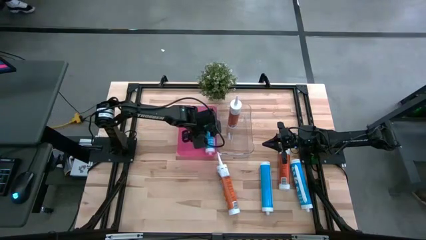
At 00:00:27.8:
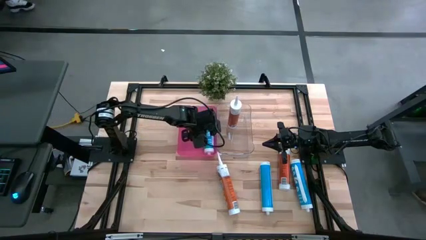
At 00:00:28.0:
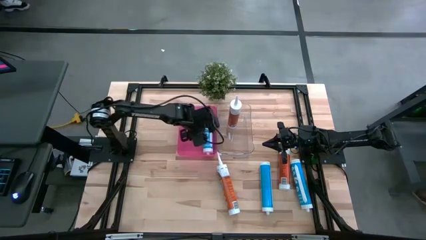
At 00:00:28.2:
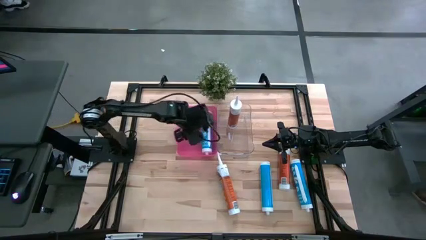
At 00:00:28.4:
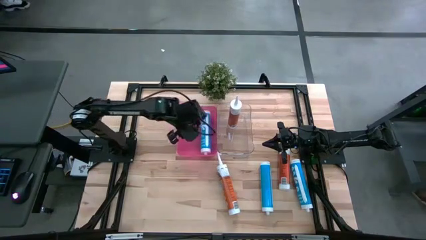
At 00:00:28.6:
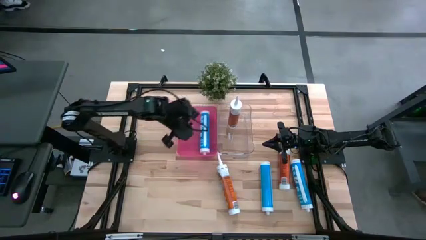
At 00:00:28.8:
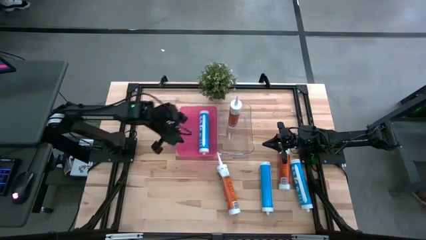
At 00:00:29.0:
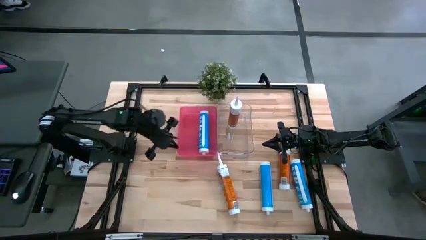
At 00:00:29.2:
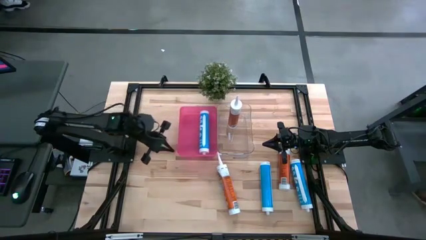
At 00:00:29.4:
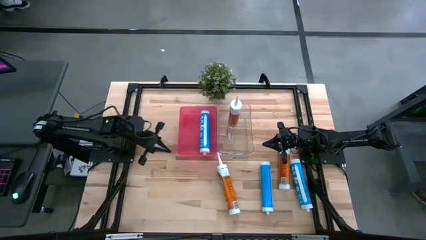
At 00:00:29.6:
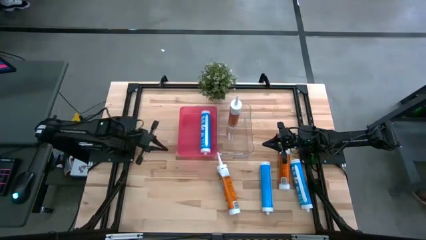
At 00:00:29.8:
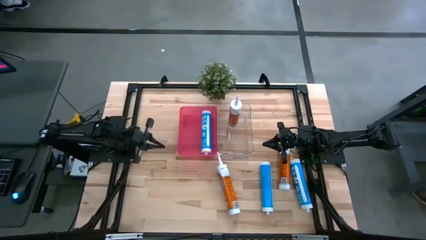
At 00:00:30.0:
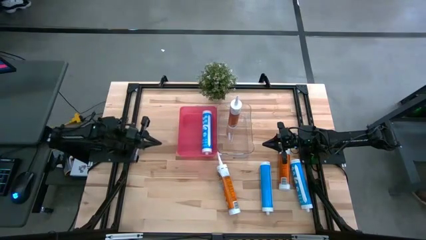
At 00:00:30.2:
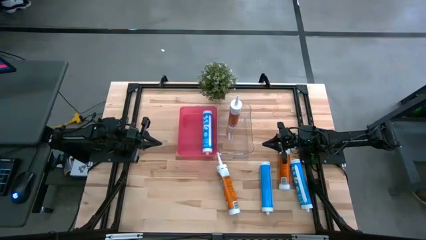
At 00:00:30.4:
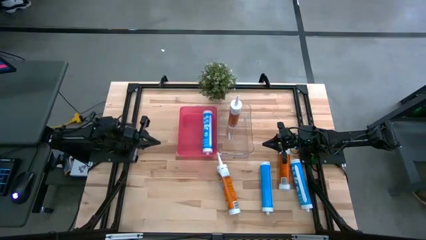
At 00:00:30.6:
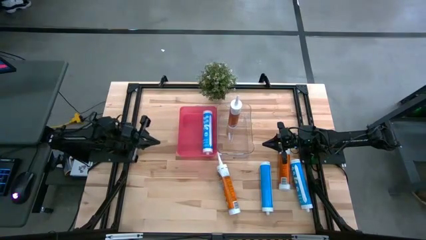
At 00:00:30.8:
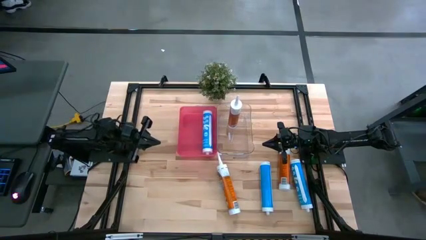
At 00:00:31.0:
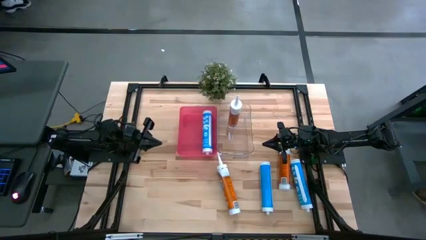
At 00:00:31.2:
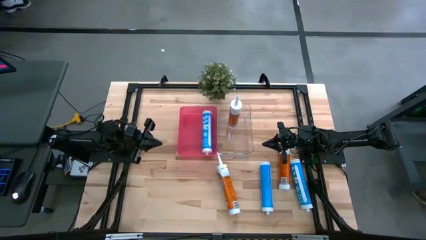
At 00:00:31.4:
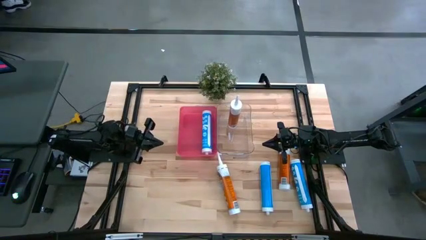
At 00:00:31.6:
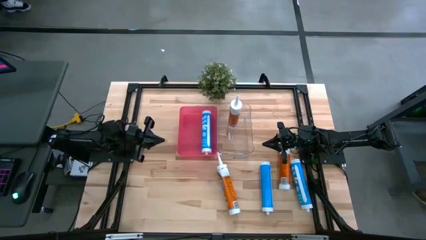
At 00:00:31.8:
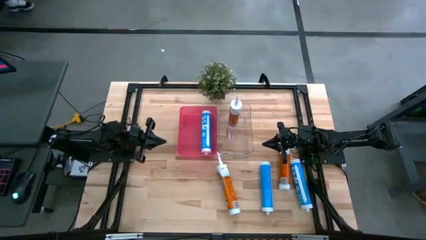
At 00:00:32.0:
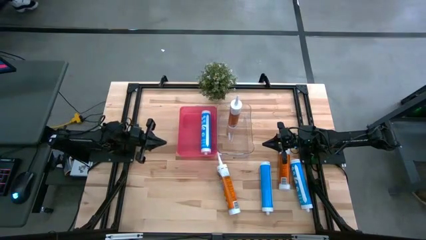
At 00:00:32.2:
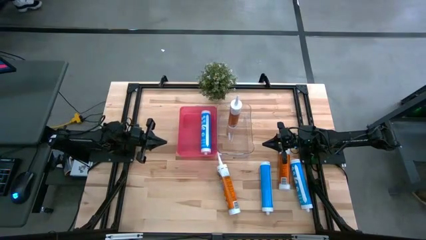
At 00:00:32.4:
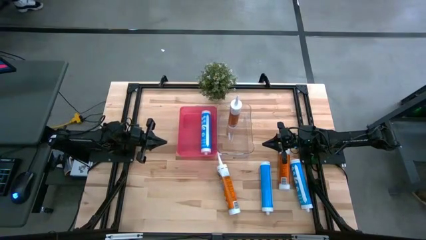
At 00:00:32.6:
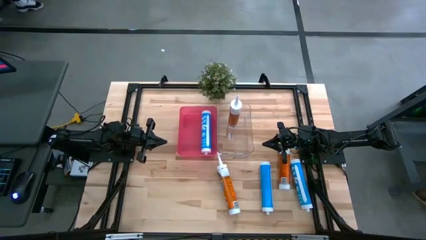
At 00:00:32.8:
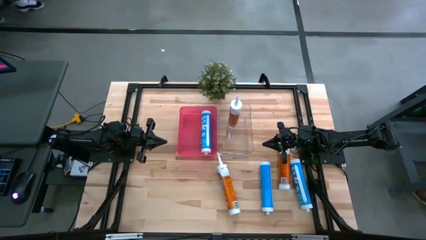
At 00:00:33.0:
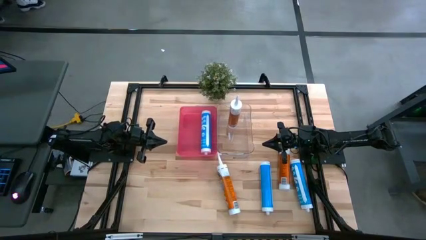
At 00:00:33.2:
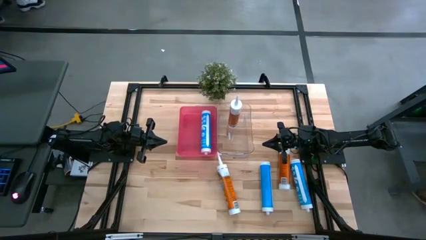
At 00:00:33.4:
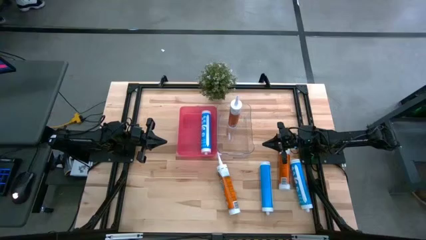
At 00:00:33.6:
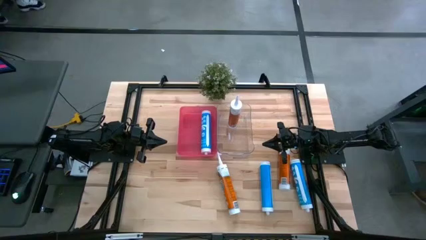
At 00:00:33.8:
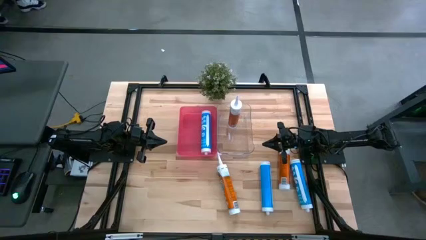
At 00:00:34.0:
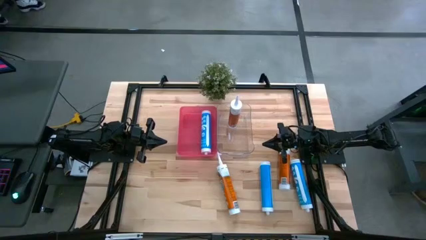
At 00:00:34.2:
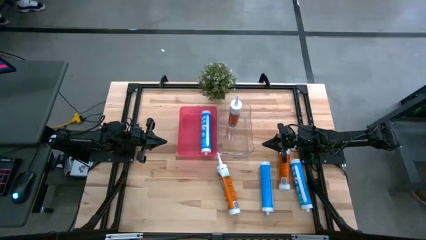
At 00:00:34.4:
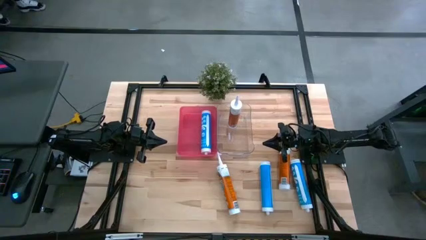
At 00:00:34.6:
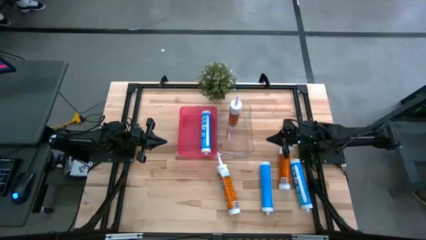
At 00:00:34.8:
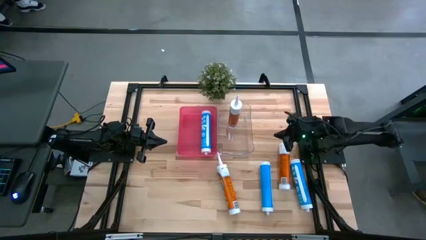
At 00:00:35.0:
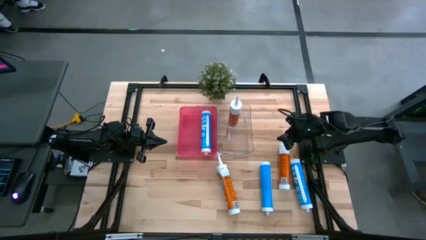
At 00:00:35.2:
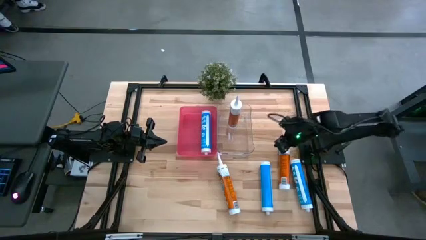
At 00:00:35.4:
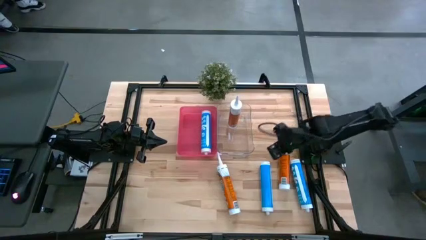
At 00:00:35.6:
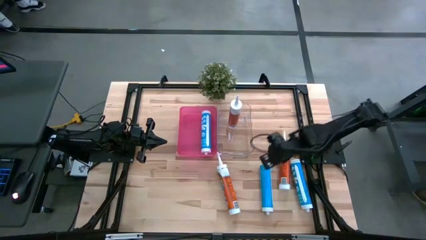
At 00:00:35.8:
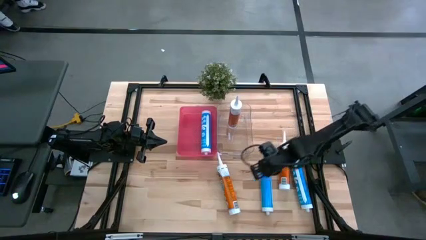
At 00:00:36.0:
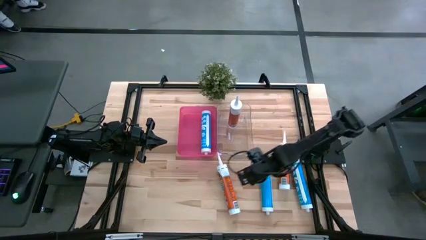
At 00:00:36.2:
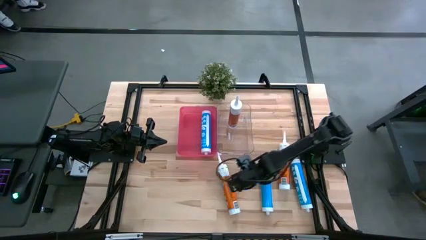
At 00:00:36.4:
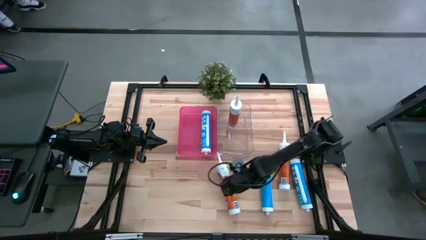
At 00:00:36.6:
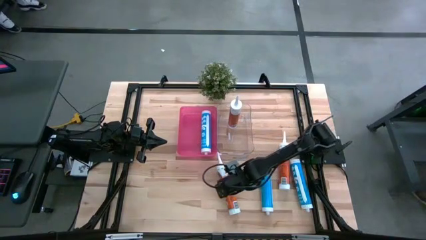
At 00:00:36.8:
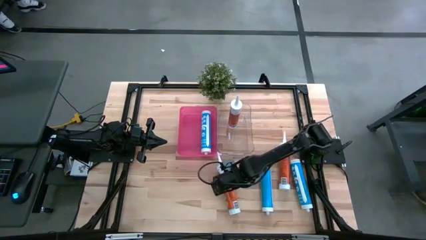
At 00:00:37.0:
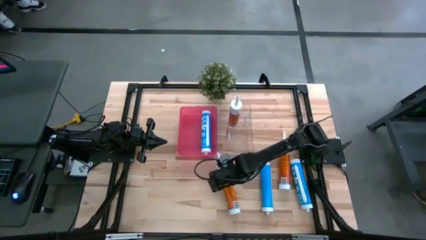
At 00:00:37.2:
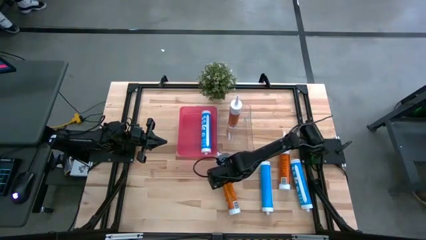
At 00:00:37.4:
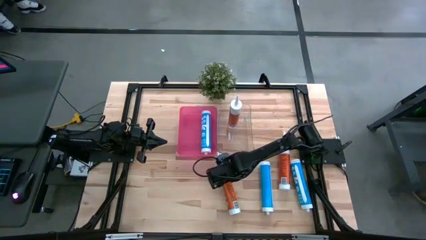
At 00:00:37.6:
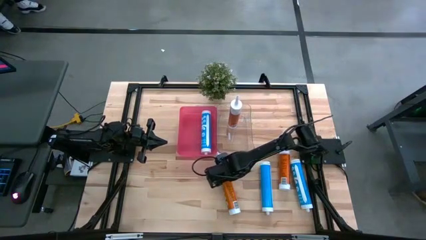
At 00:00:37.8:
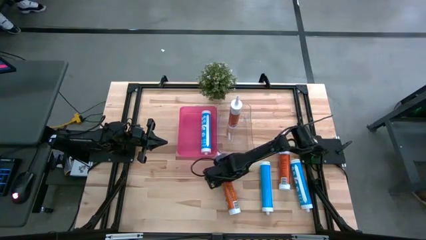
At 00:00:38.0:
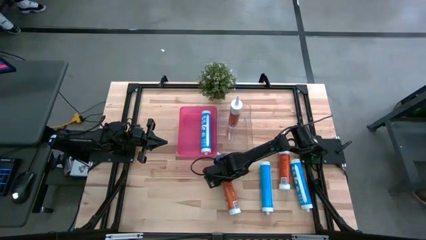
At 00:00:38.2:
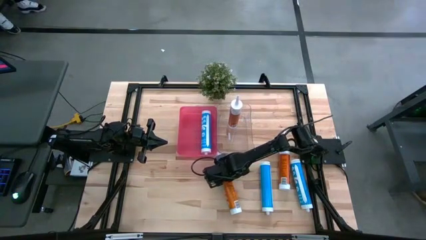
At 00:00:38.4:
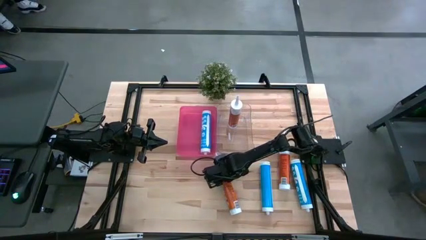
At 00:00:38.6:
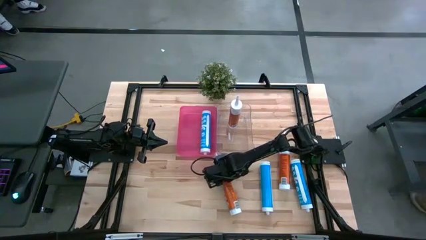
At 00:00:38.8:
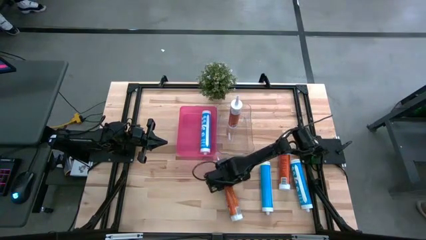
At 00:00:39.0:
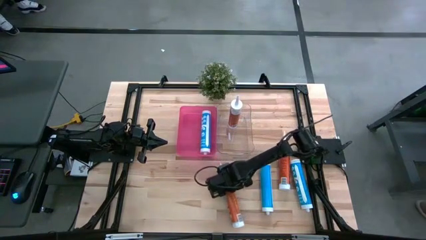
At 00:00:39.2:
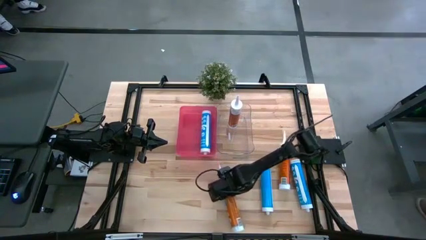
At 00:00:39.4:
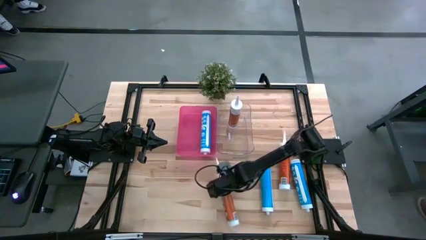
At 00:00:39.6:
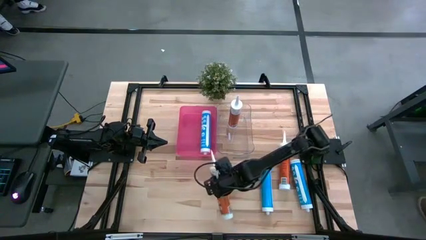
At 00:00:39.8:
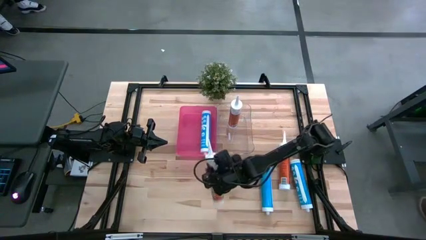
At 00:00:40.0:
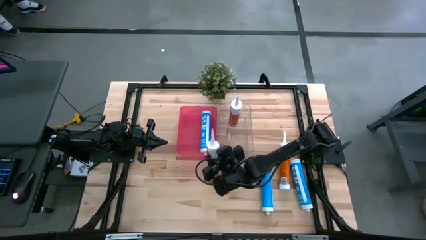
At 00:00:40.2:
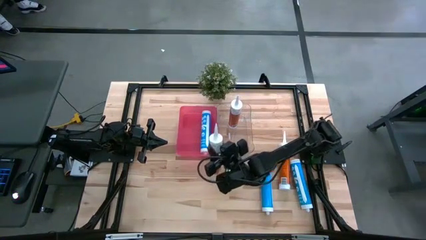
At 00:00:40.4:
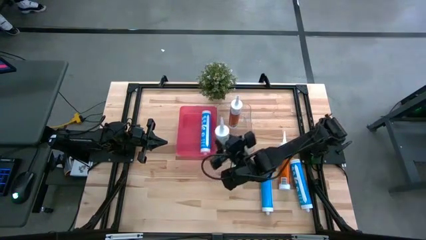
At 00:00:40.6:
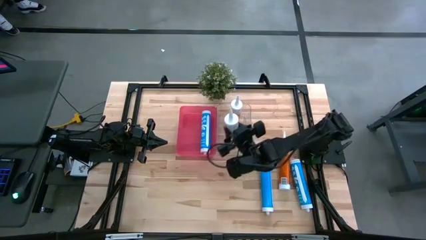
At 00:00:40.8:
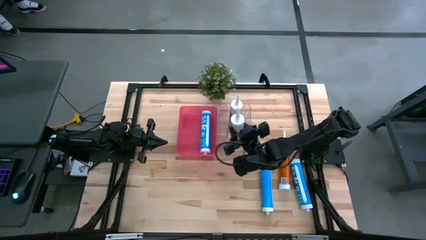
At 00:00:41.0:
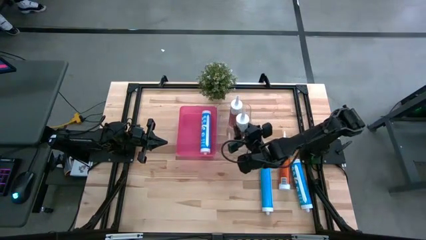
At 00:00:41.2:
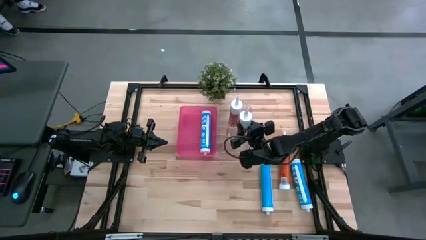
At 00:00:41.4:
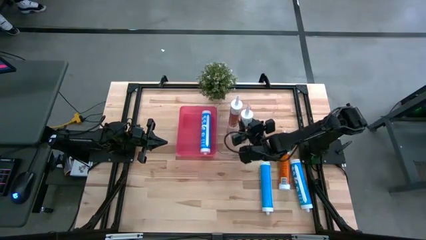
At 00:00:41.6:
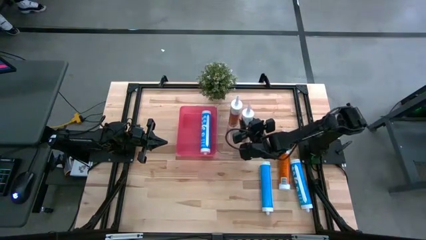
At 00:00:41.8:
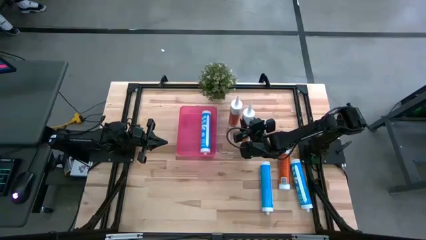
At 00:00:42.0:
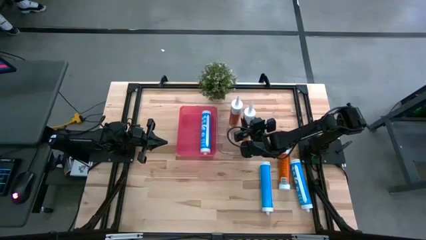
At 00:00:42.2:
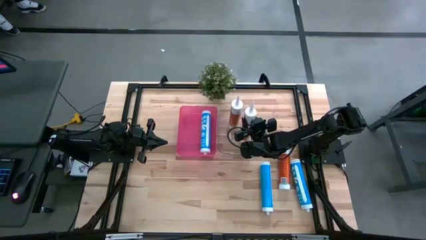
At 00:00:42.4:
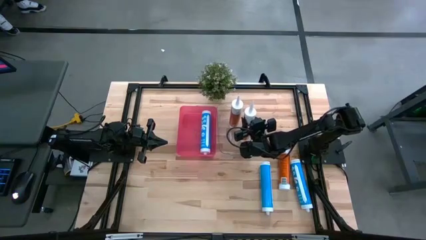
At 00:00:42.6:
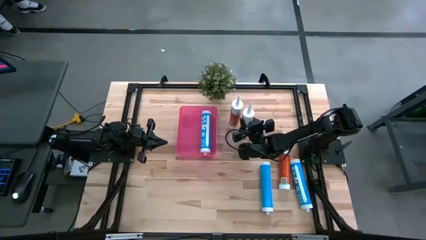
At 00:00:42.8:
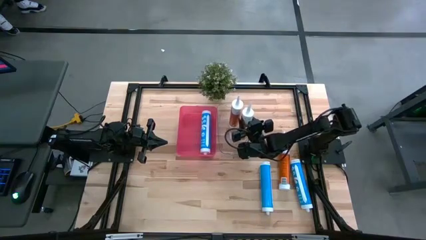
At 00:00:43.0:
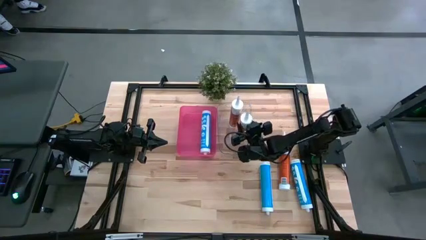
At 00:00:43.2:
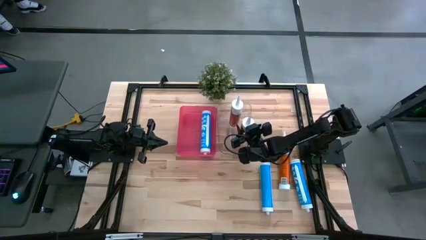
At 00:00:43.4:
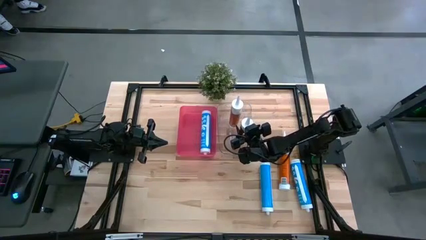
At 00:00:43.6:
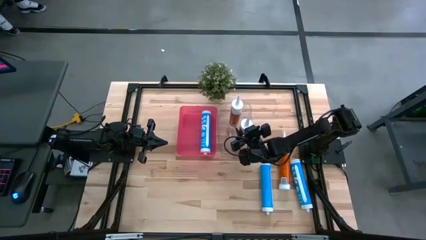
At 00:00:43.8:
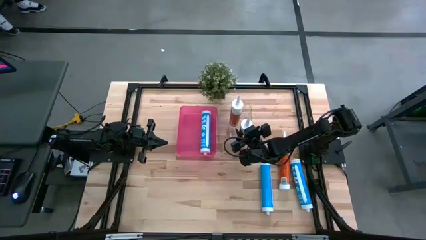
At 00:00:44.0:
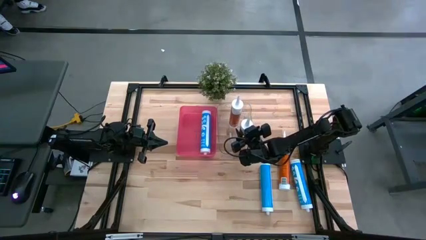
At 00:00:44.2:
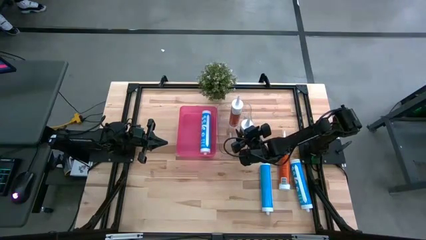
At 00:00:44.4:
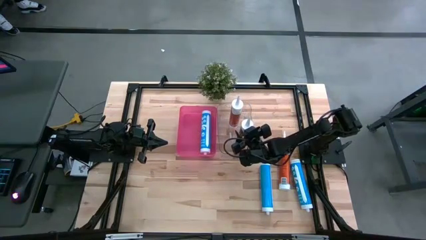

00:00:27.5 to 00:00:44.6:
Task: Pick & place silicon tubes, Sealant and Lysol wipes
Put the left orange sealant into the transparent bin
